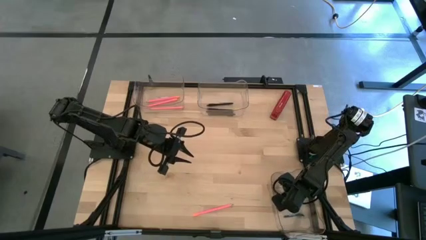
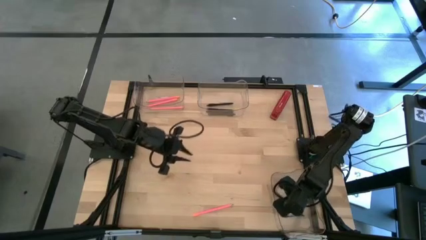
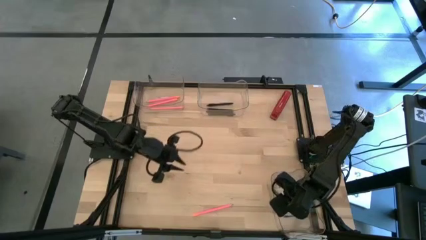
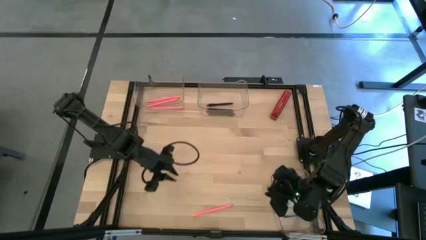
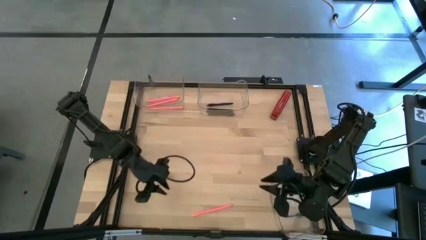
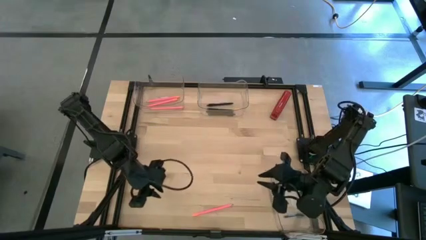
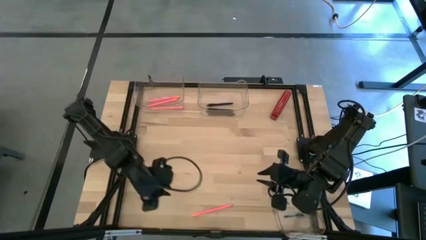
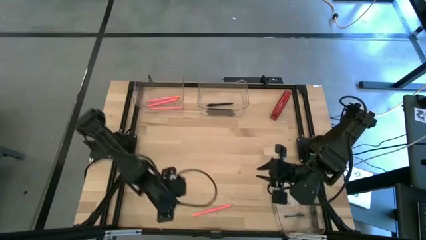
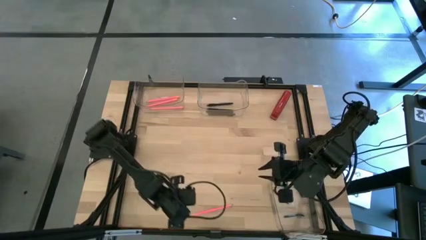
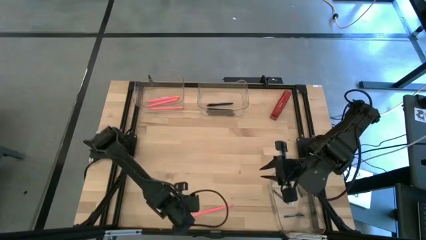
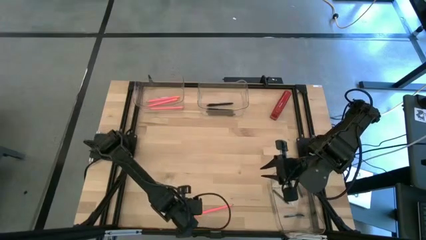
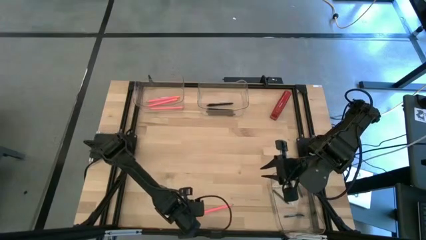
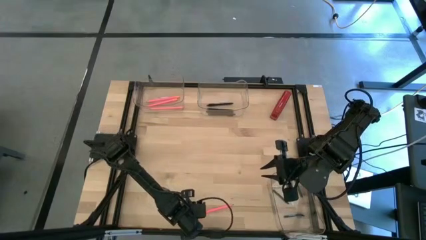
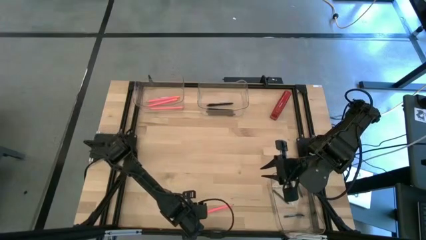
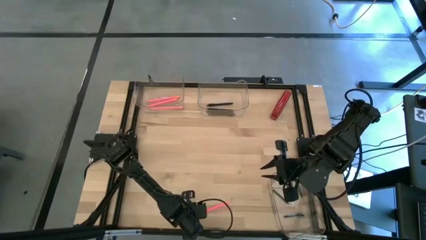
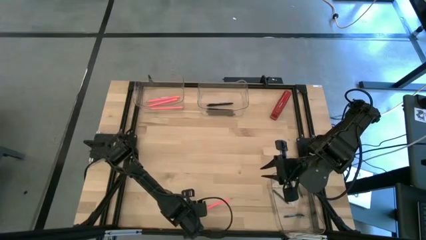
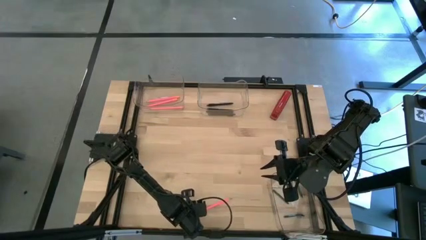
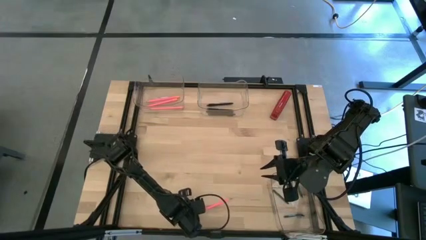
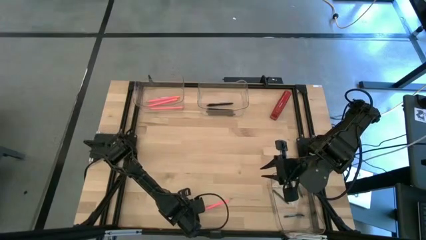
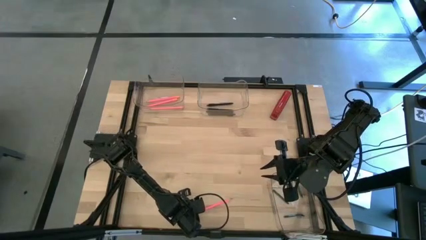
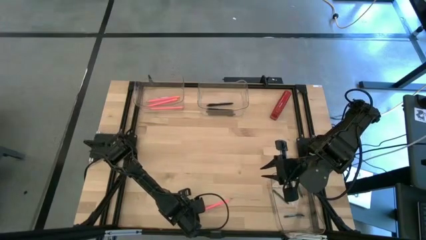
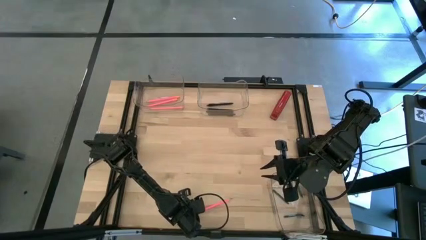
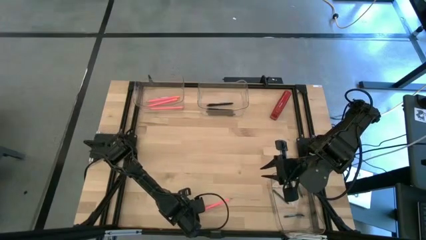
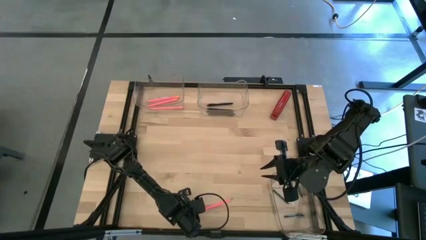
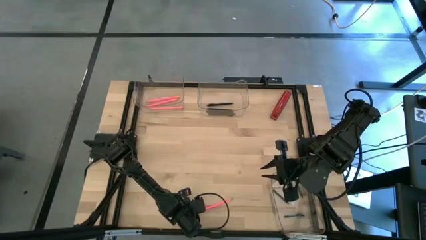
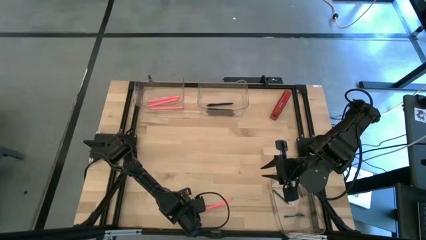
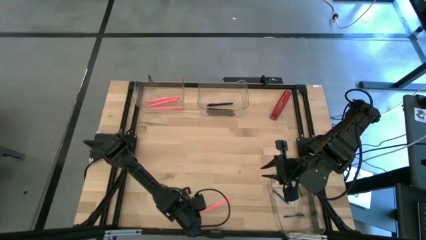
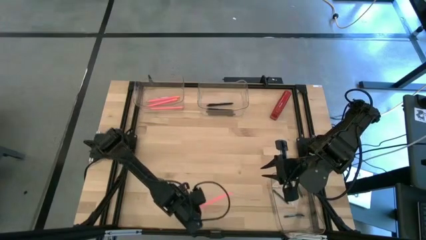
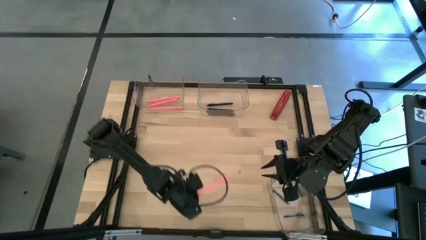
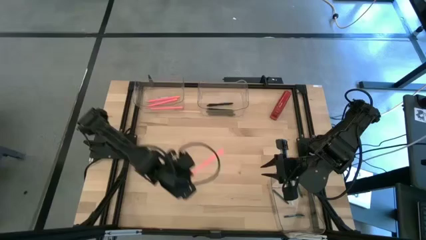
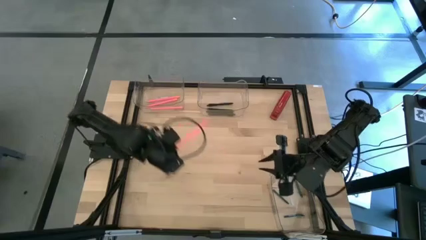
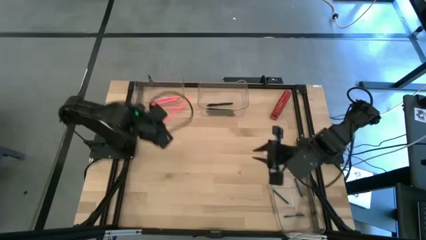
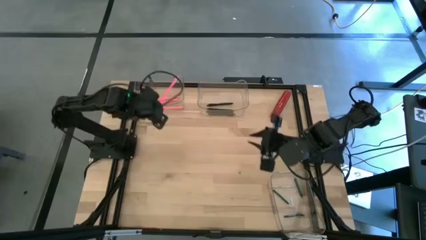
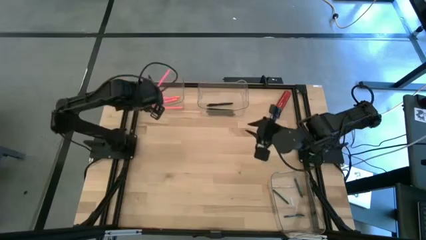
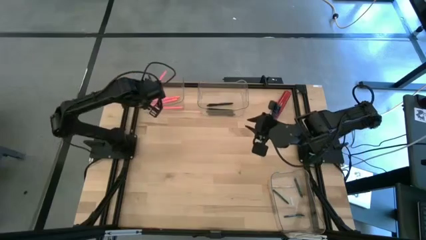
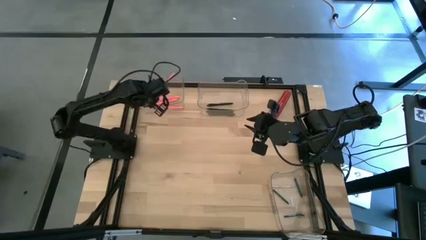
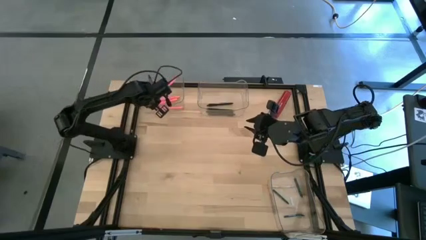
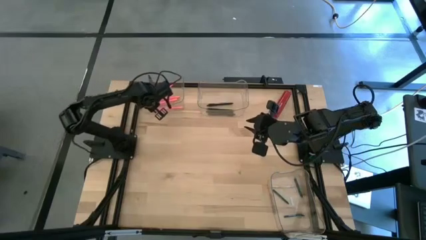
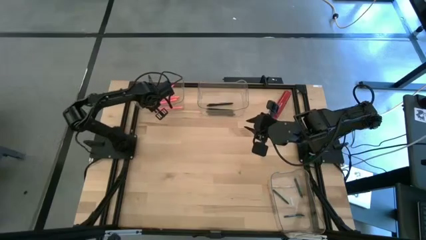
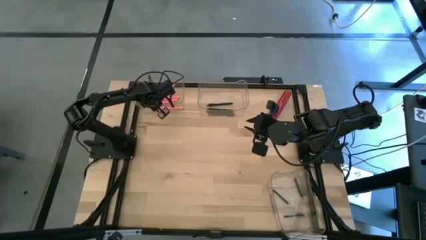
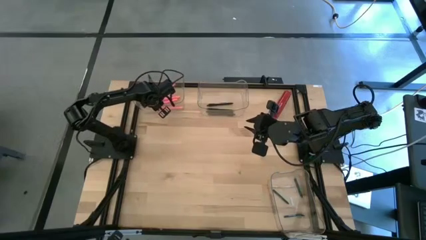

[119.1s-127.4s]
Task: Sort crayons/erasers/pens/pencils in bins
Put the pink pencil into the top left transparent bin

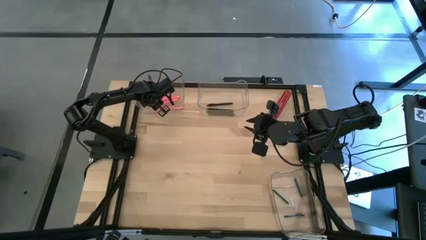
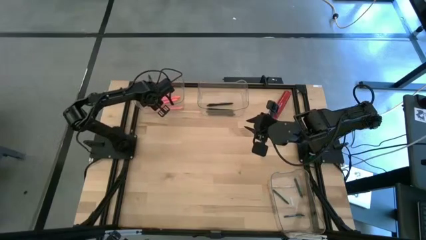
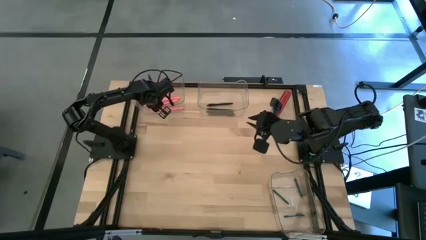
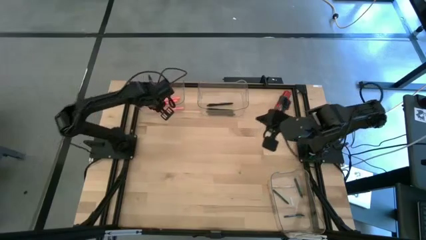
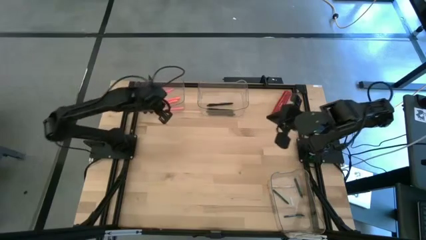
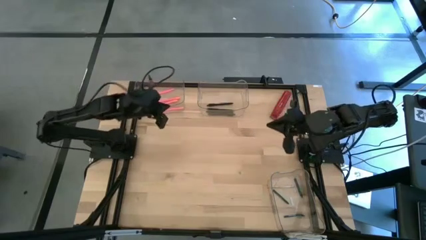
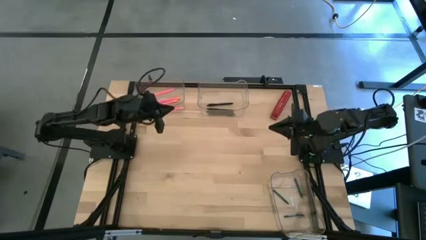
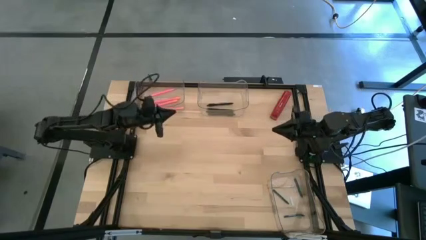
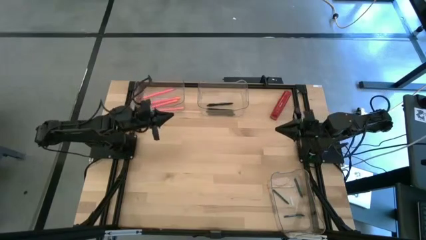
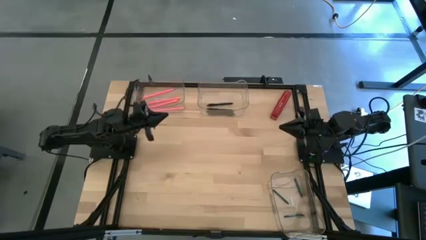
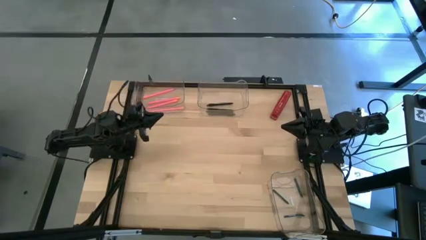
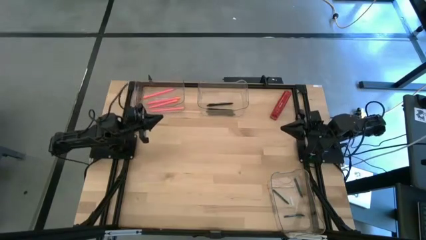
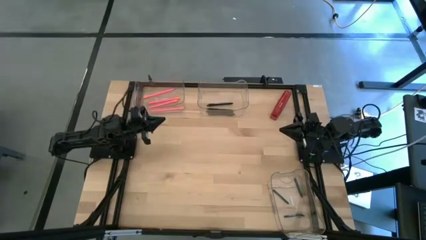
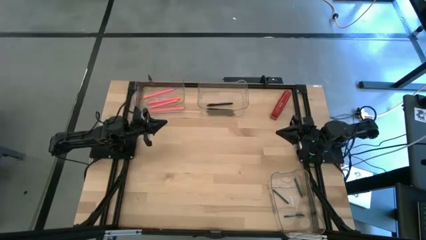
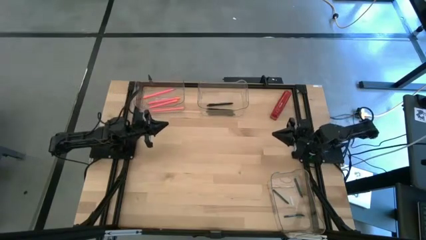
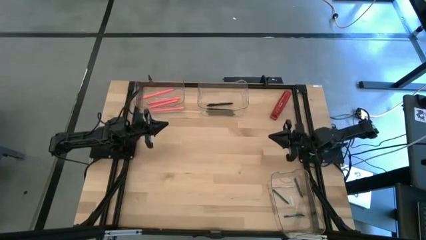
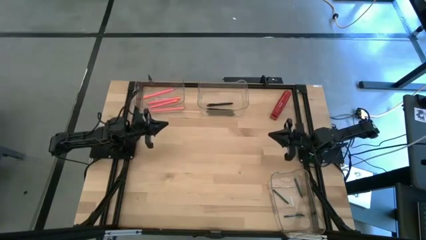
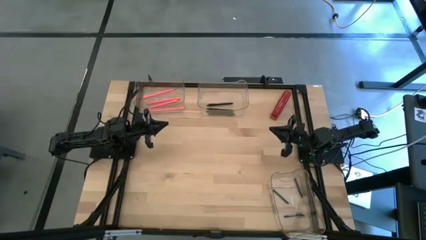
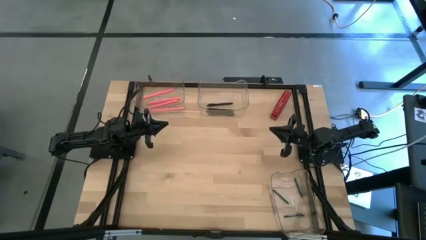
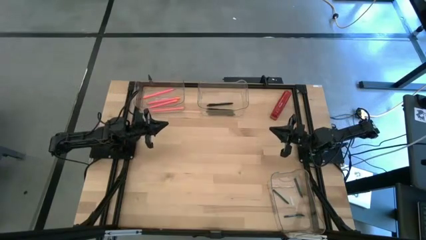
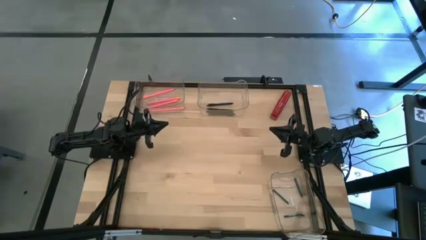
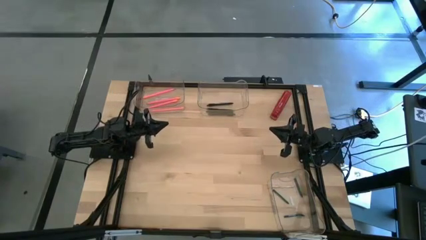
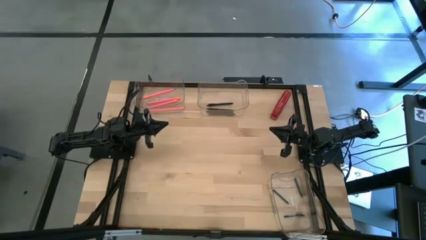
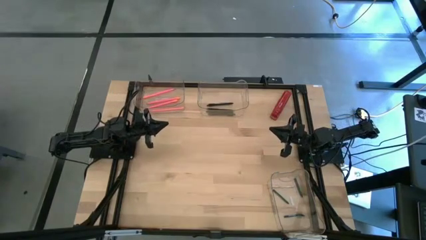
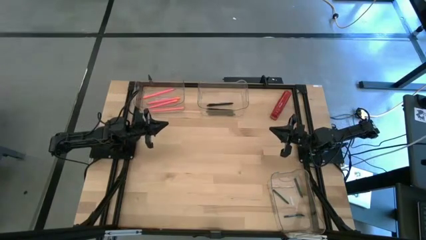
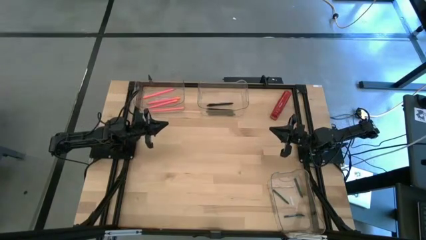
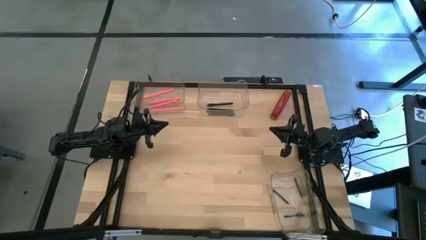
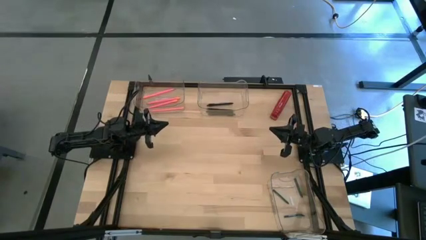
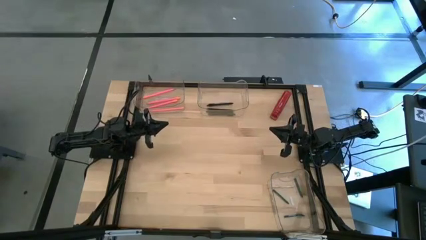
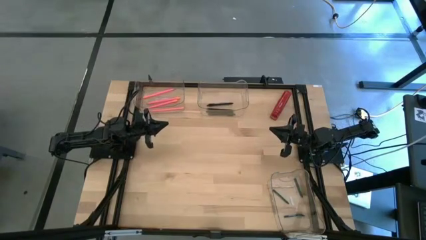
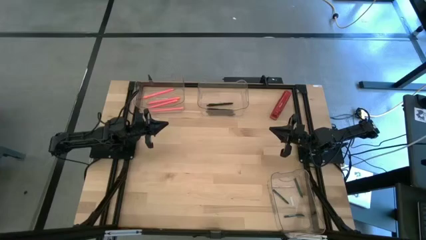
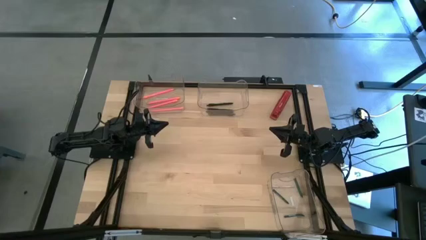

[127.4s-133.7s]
Return to Home Position
